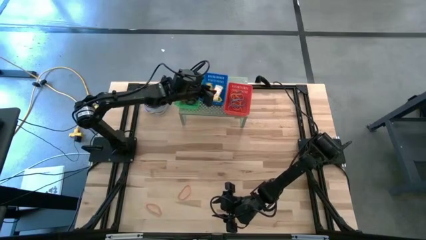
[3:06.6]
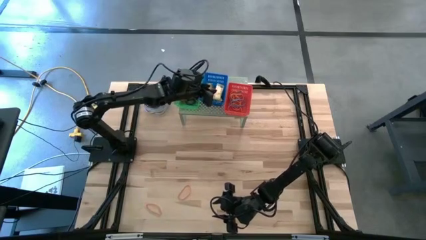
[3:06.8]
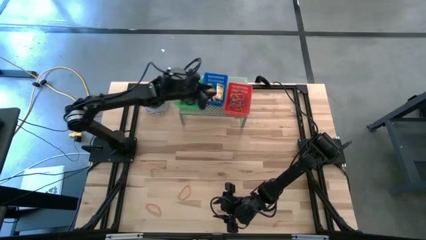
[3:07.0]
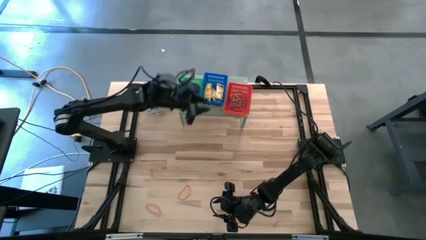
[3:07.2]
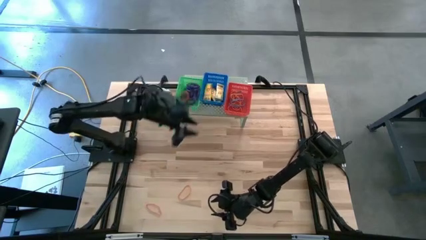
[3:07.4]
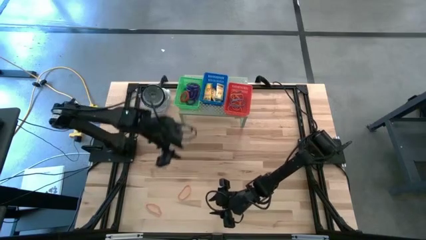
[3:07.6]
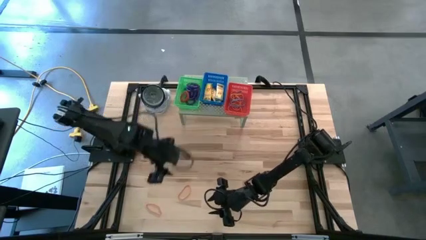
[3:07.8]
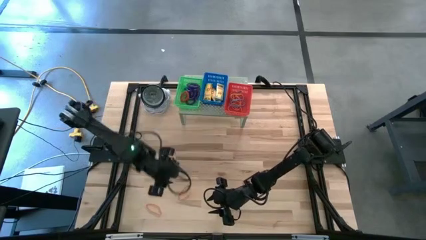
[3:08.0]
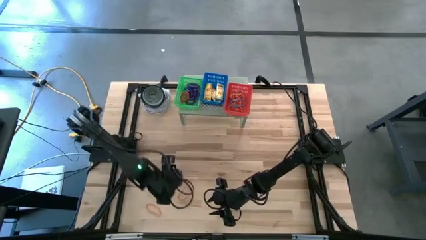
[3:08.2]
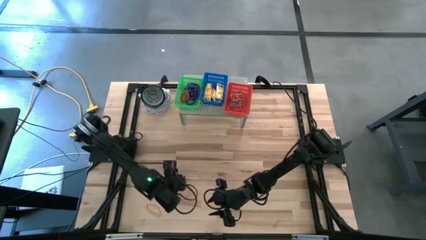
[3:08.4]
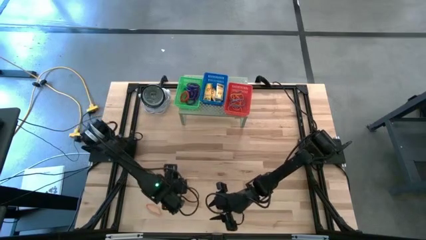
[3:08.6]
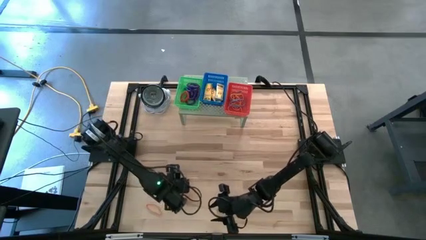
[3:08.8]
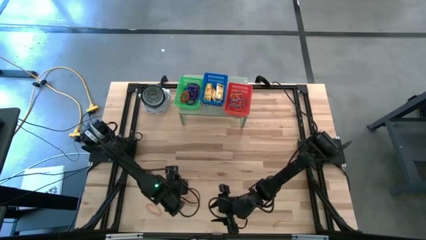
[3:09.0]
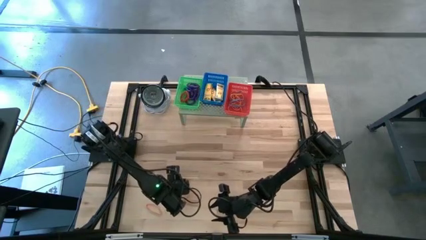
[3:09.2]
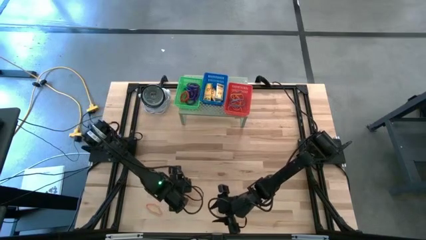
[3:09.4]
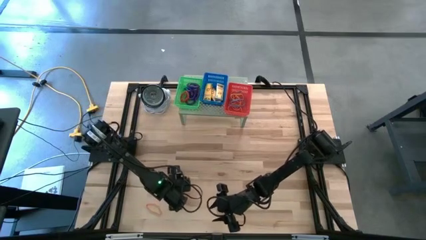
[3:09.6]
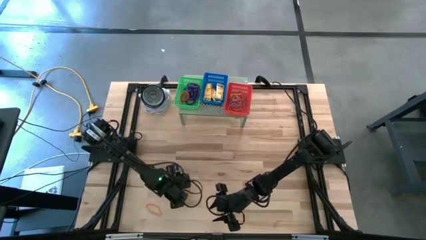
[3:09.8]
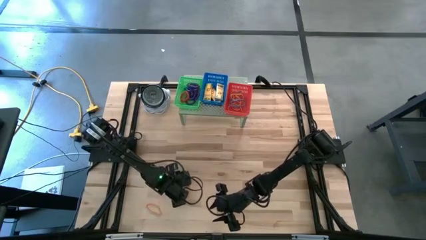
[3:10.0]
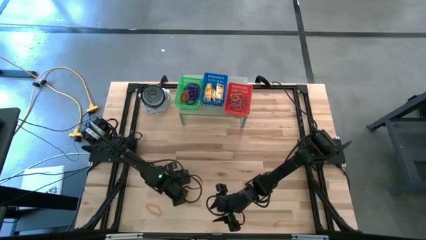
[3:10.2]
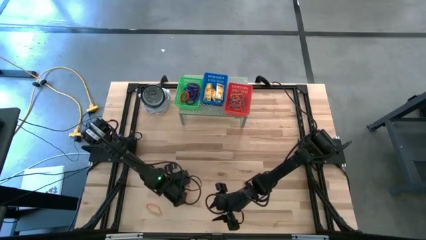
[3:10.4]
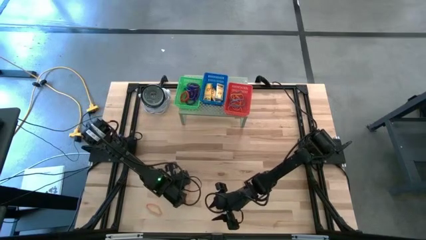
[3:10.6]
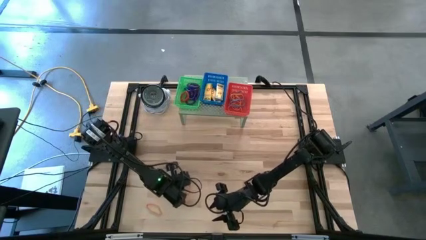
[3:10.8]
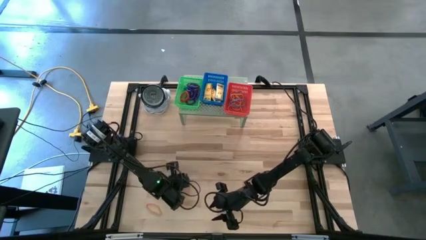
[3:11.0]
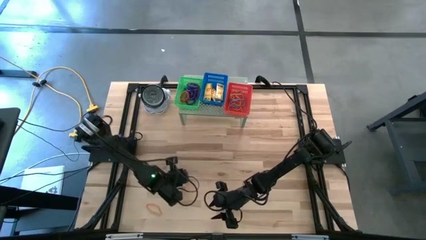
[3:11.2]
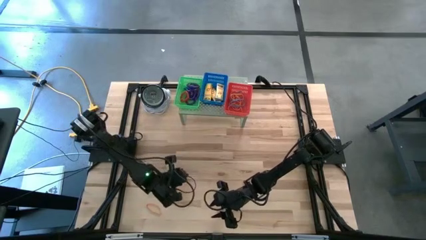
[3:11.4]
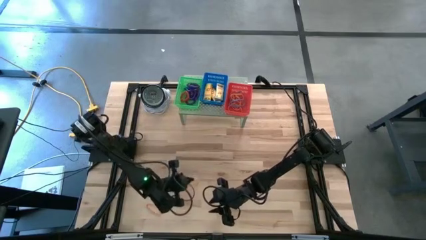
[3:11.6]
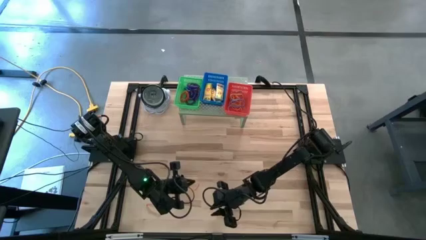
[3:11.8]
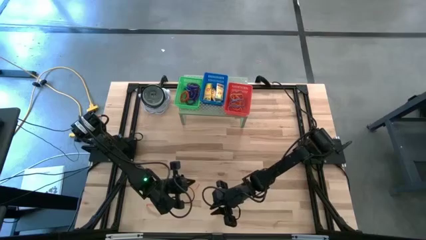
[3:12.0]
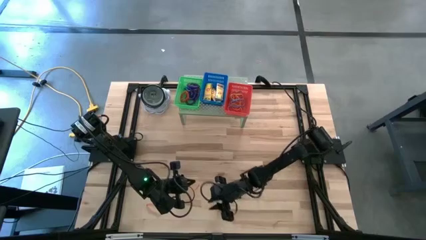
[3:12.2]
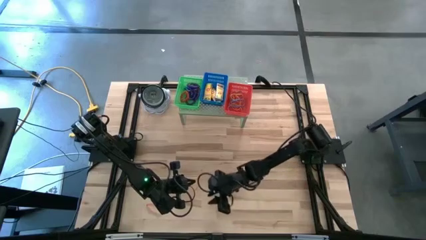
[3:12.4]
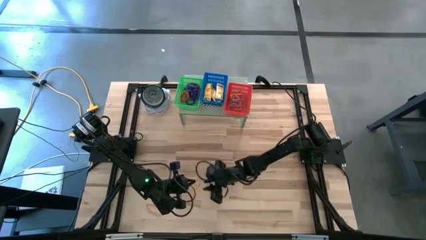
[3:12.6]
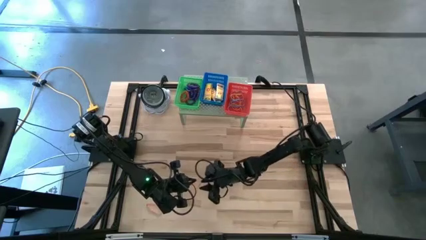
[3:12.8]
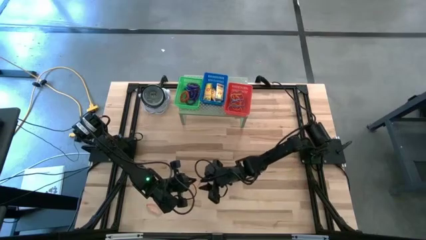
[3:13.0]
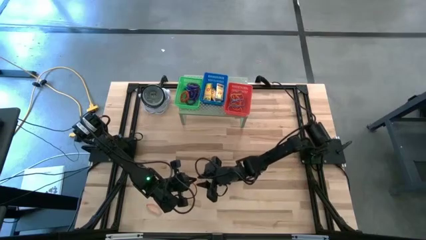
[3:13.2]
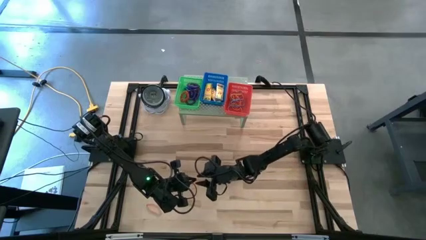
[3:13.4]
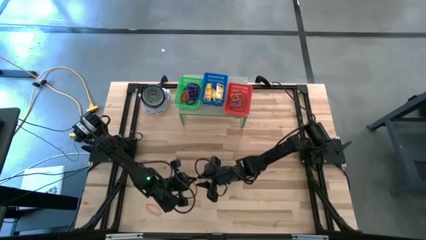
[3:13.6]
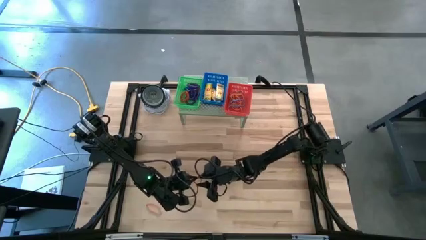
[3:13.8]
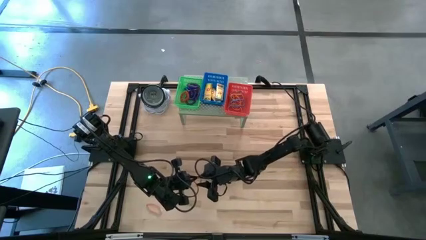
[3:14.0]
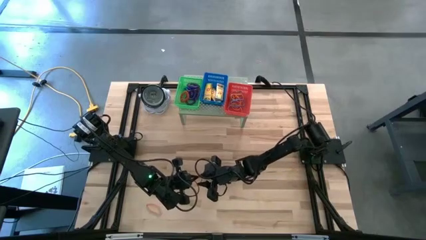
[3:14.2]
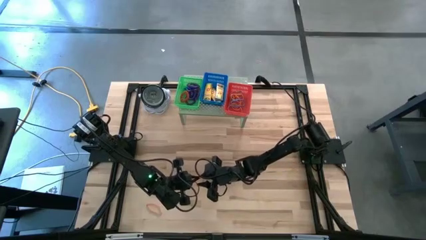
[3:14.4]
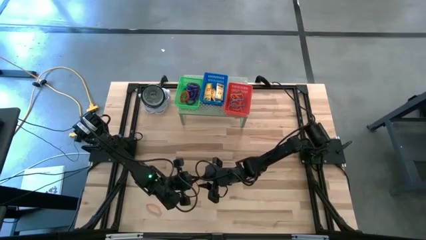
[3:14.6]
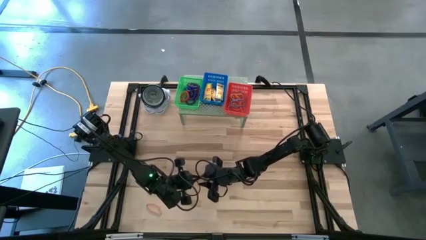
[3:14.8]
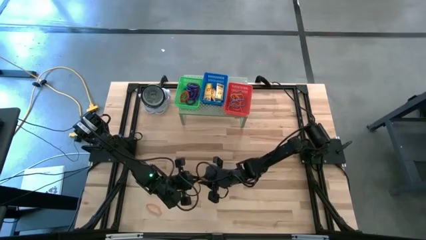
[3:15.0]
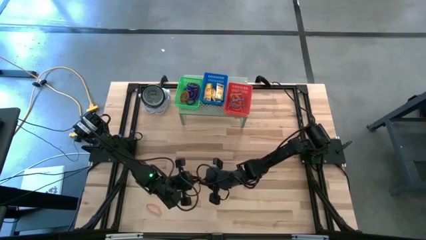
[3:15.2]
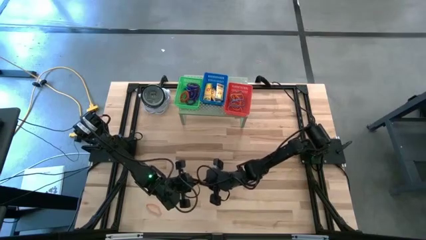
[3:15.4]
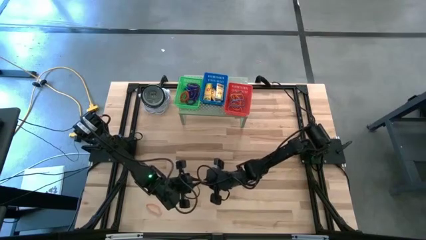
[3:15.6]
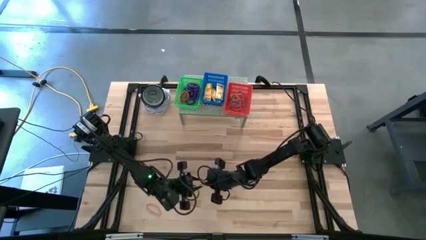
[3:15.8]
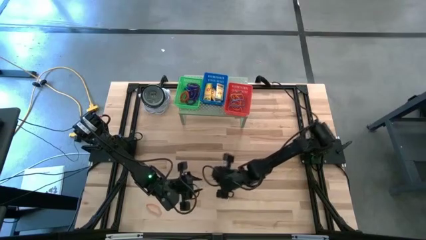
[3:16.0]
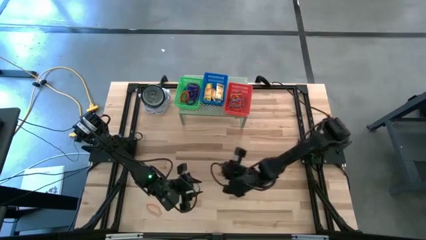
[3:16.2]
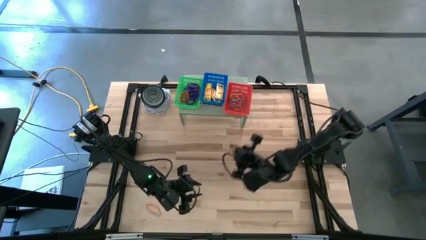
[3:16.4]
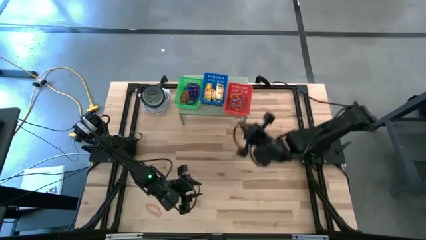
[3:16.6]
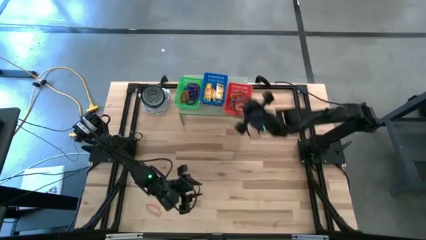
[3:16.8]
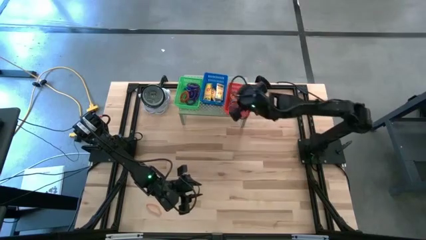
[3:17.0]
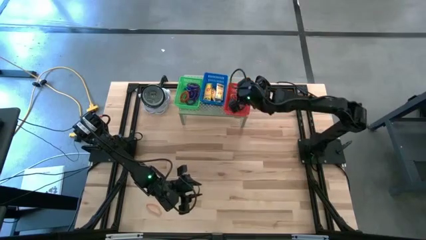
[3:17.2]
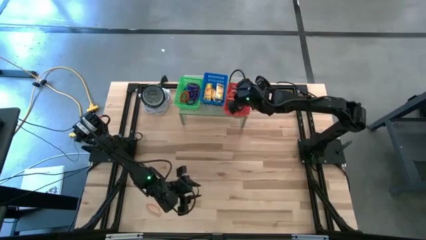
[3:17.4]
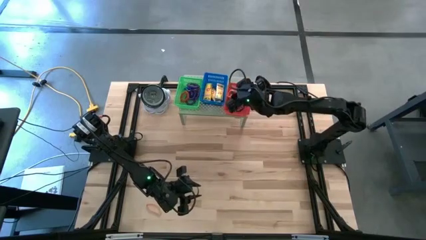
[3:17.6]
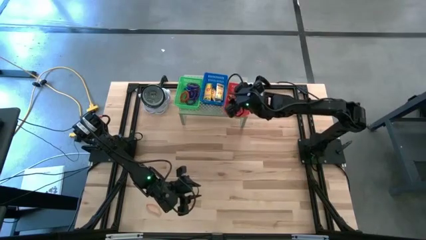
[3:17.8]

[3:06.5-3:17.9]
Task: Pick & Place Office Desk Supplies
Put the orange rubber band into the red bin on the shelf

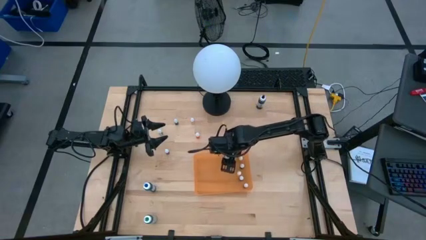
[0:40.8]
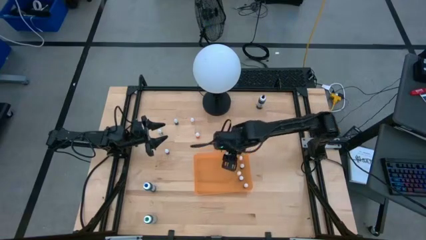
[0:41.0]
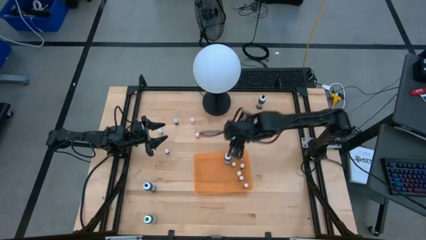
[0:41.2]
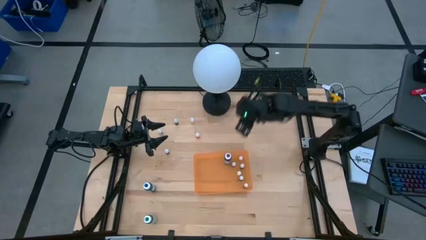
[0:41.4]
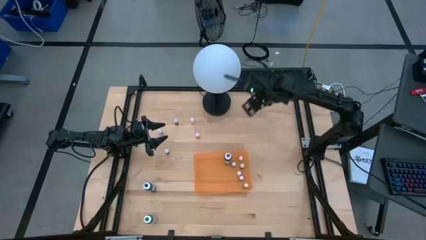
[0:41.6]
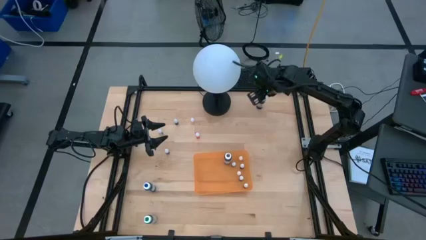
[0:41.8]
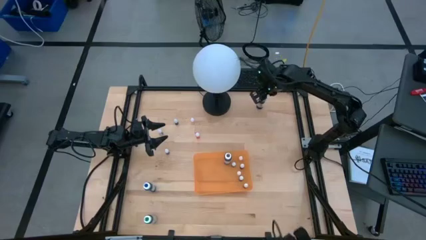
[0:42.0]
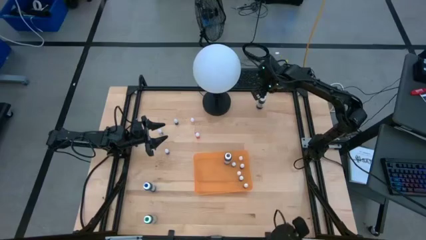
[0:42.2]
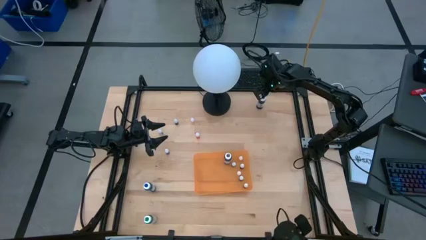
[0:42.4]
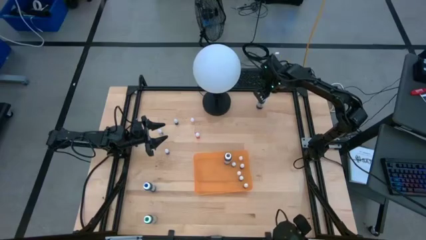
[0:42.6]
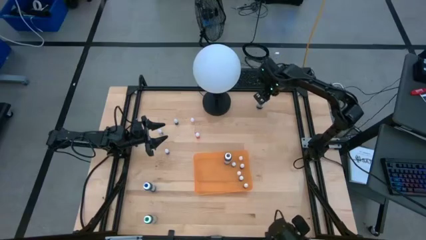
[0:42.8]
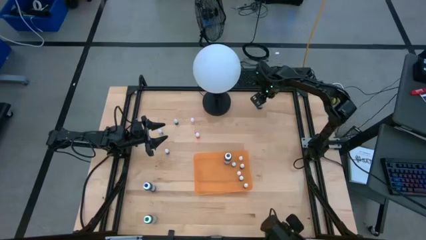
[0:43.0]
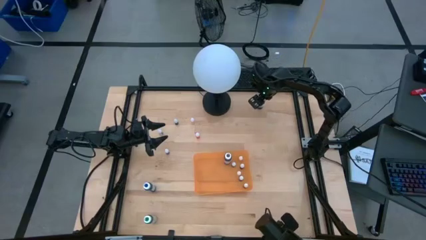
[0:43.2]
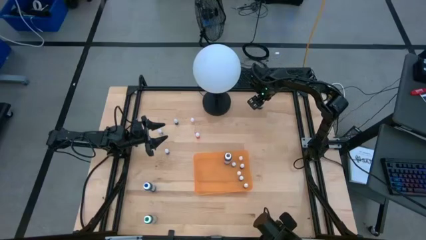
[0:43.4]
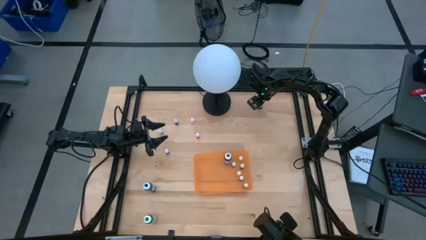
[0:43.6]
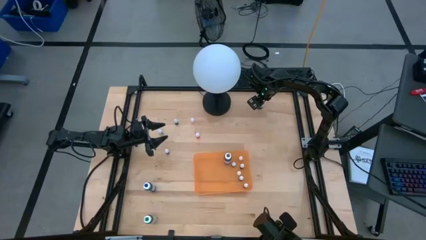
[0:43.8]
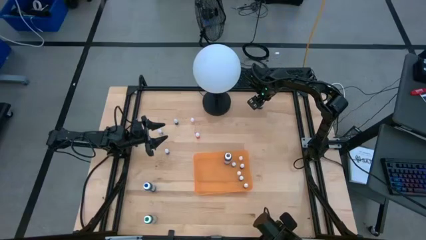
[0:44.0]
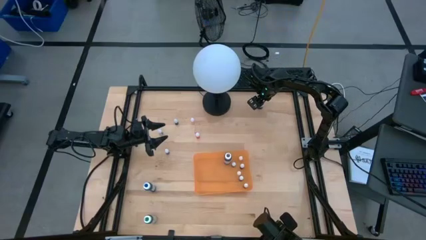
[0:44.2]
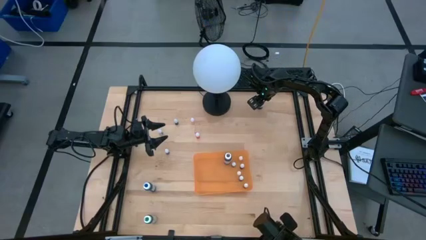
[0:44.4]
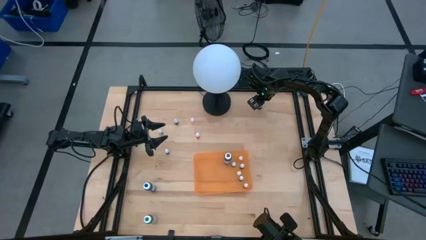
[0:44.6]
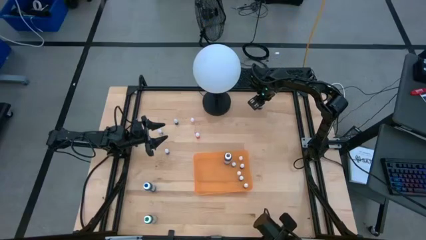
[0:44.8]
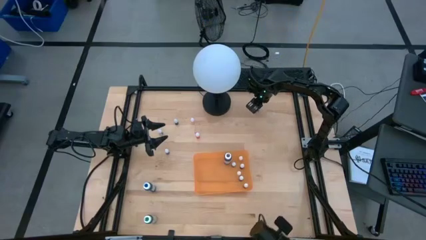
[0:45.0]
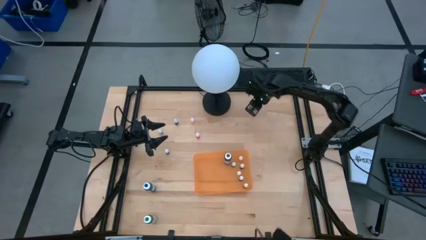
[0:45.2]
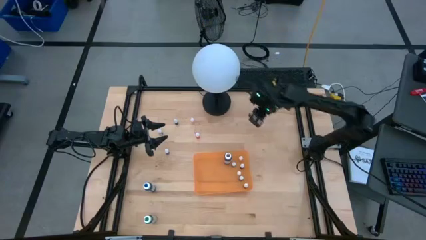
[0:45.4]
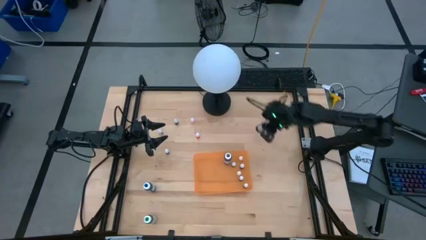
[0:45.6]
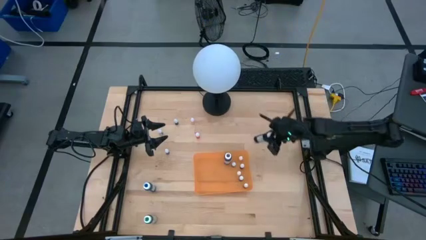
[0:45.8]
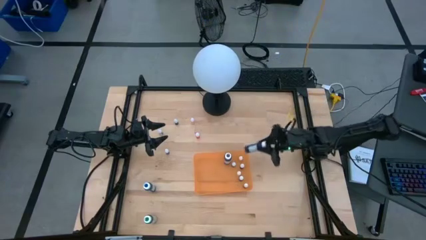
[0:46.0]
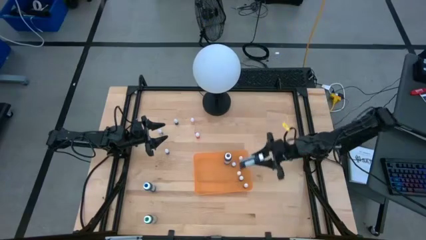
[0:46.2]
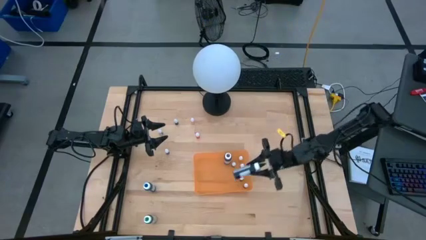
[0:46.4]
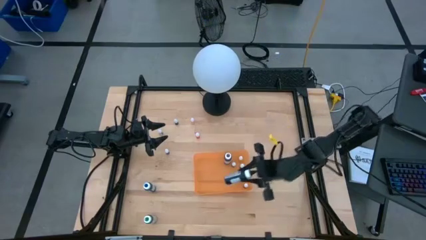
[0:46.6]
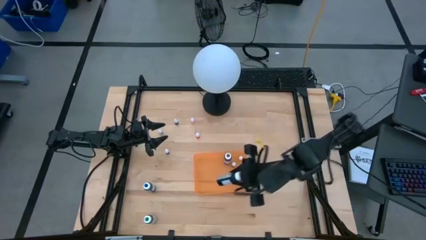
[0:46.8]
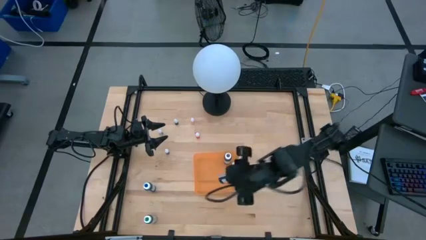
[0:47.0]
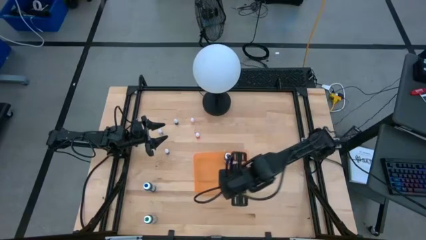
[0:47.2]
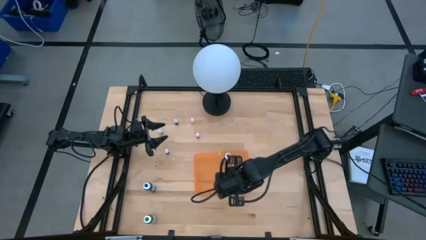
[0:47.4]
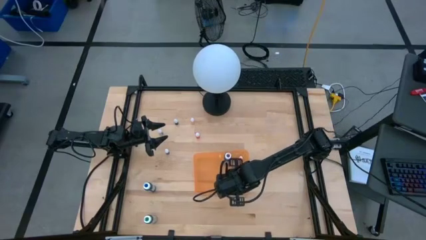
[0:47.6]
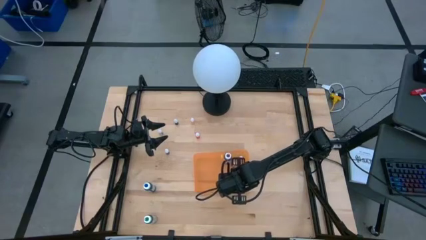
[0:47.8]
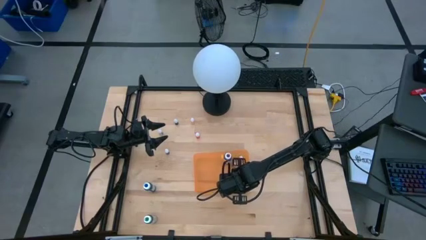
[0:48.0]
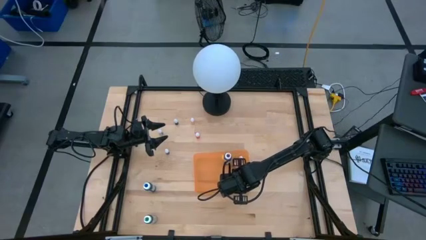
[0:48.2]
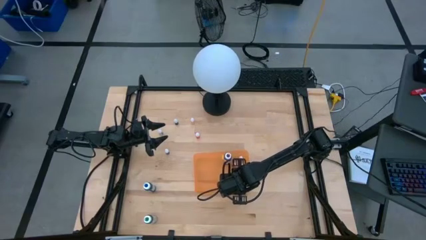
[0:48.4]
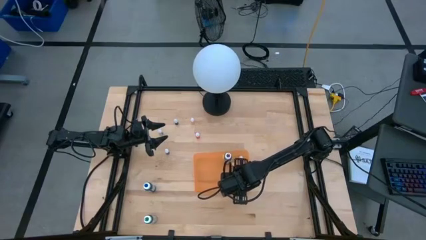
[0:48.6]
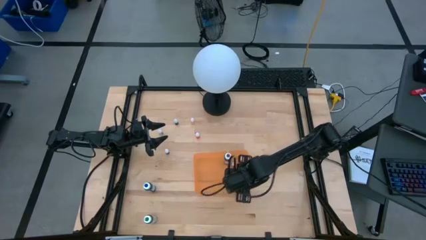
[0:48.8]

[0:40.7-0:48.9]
Task: Pick & Place food coloring
Put the large black food coloring bottle into the orange container
